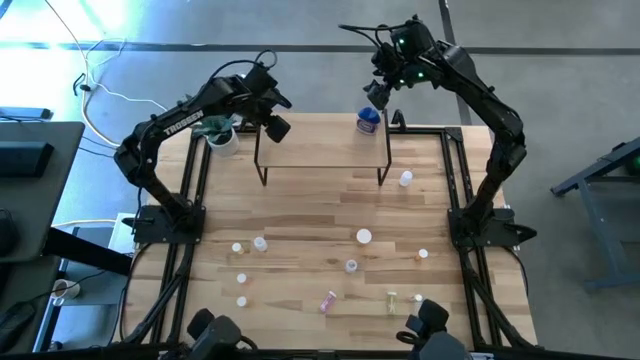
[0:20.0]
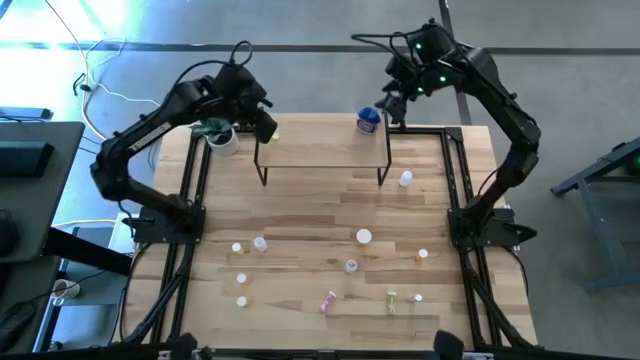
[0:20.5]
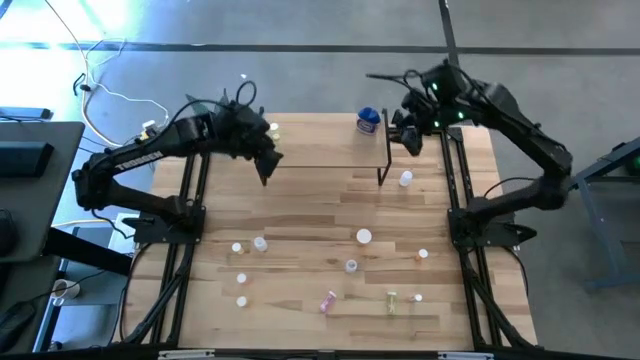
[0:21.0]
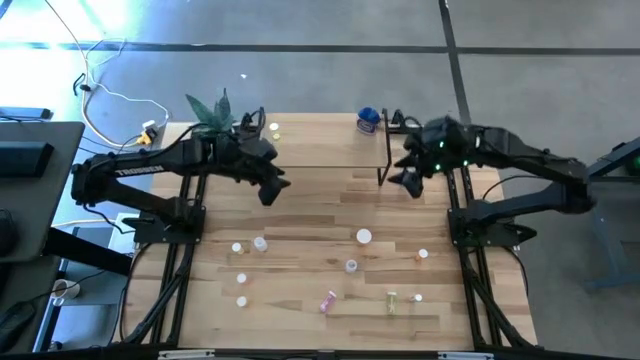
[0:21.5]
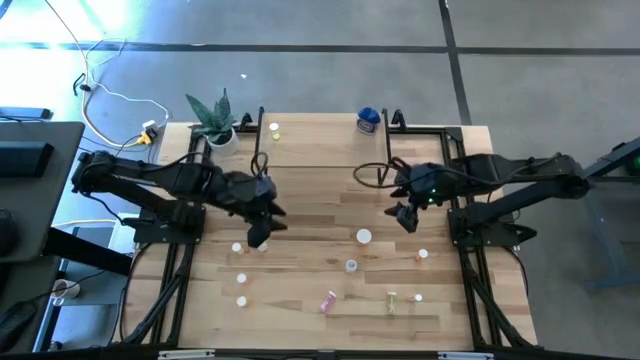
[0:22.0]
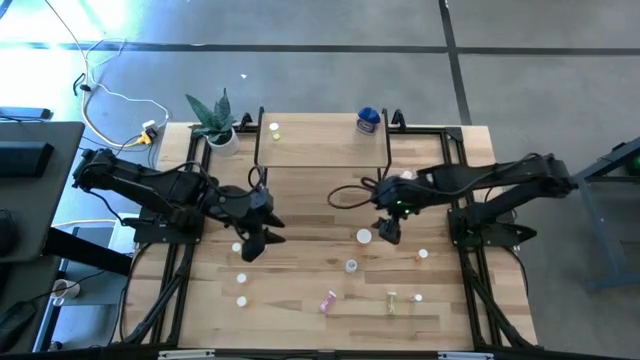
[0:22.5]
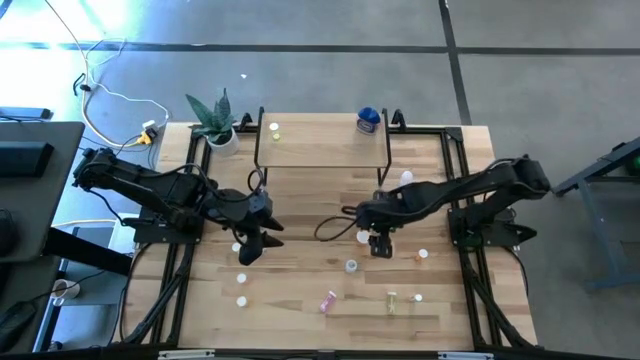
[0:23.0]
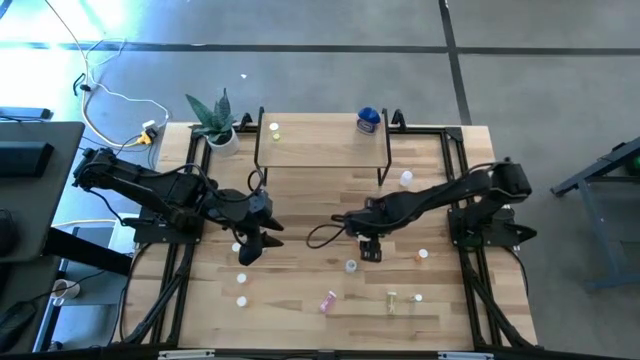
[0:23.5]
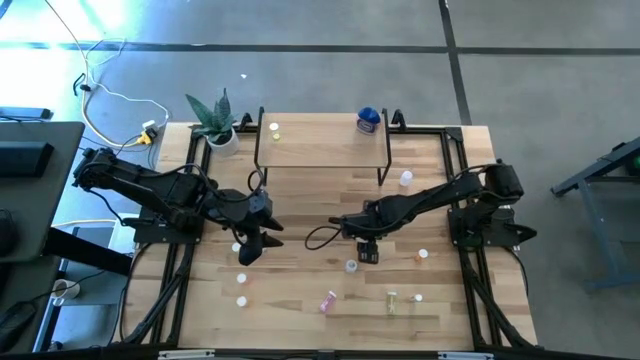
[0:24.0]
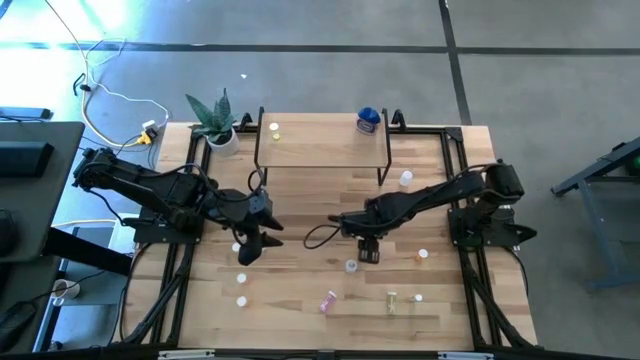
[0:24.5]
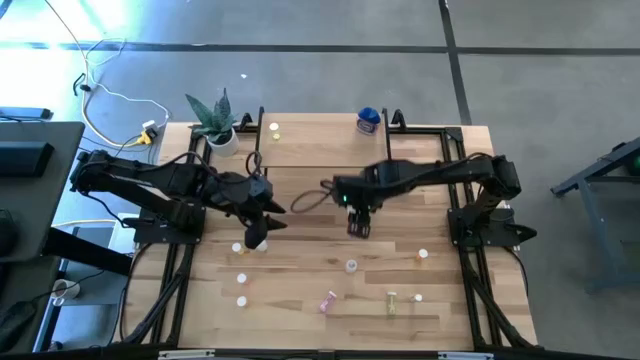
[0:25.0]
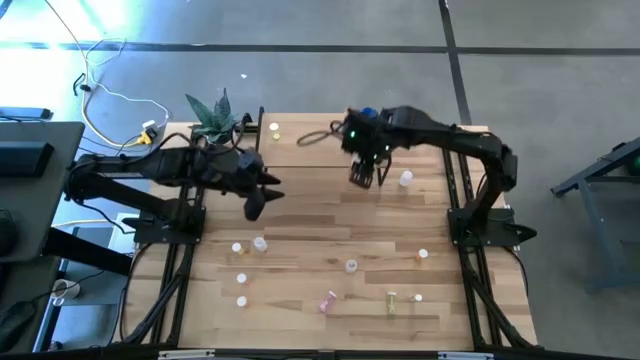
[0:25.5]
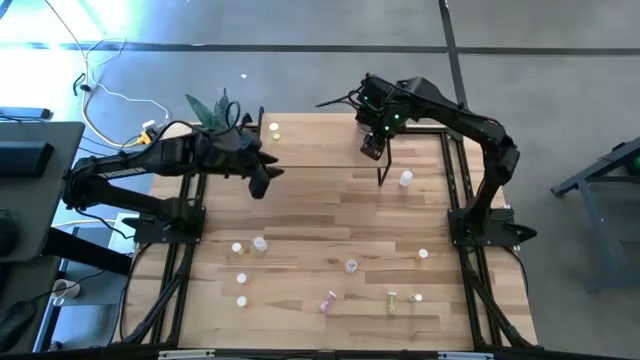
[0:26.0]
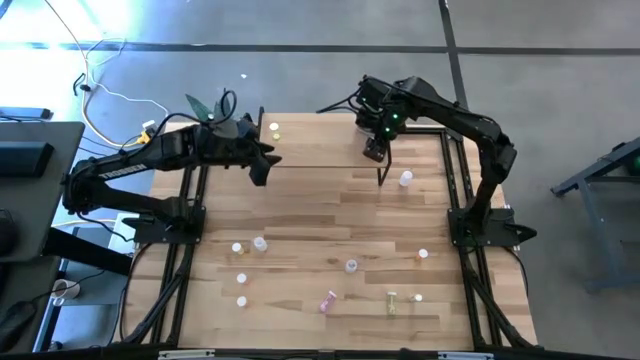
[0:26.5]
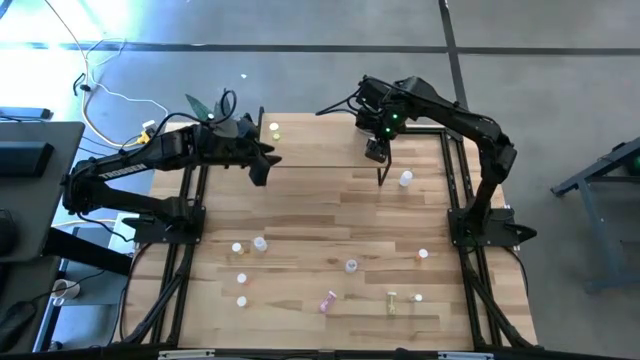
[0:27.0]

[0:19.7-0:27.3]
Task: Pick and place medicine bottles onto shelf by color
Put the large orange pill bottle on the shelf

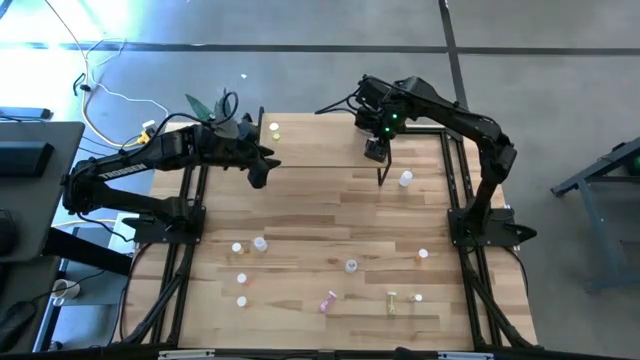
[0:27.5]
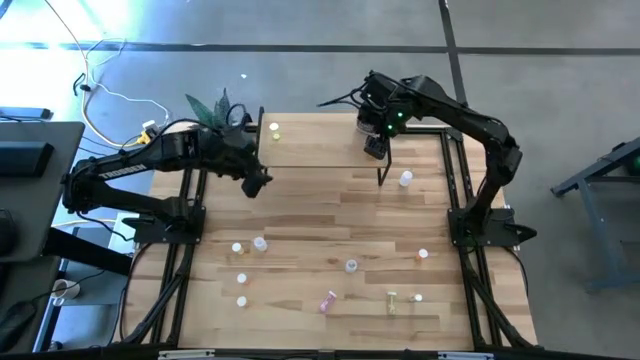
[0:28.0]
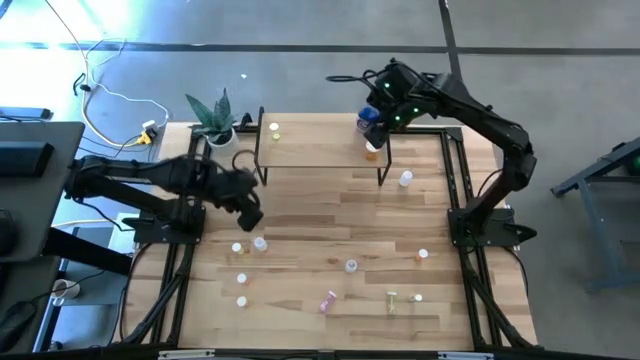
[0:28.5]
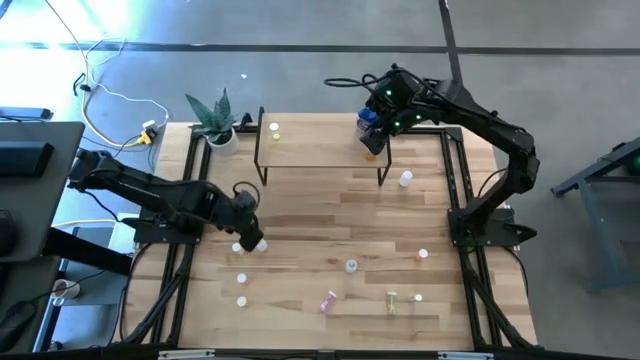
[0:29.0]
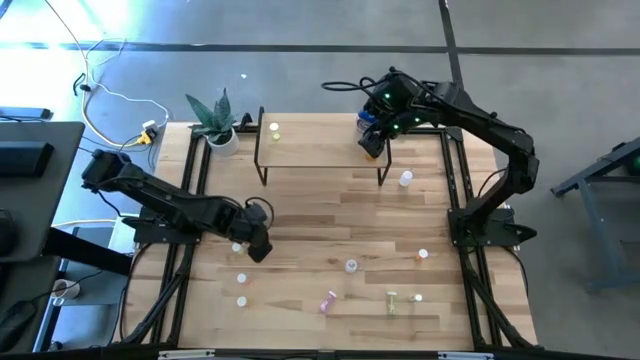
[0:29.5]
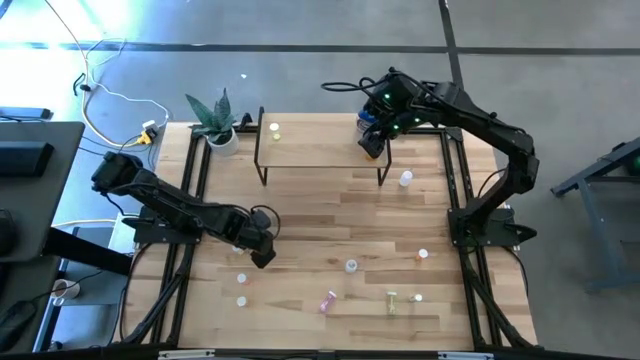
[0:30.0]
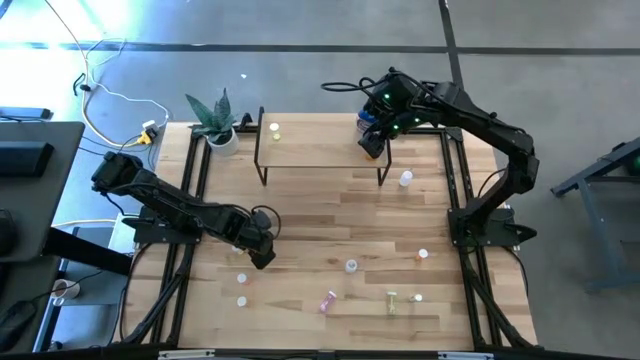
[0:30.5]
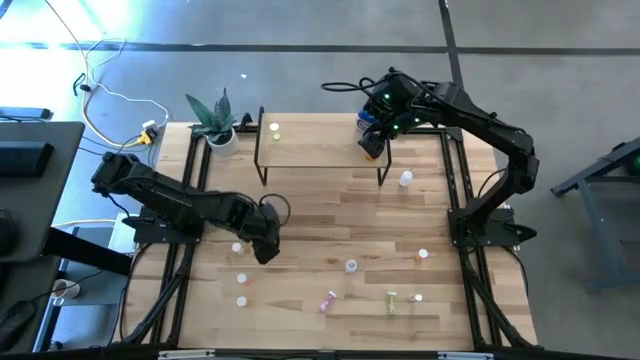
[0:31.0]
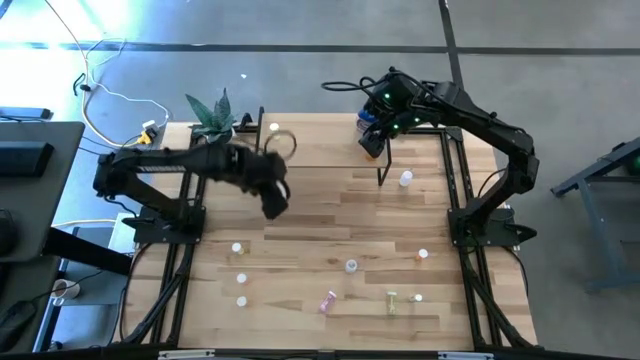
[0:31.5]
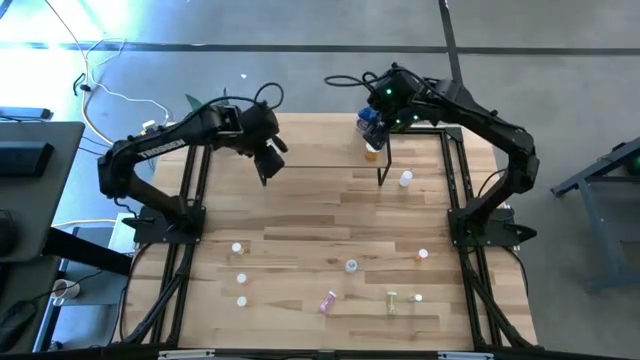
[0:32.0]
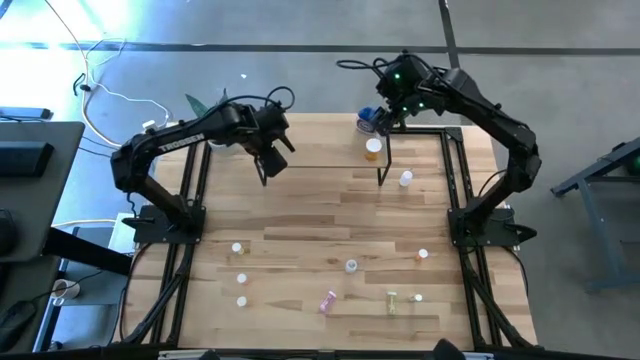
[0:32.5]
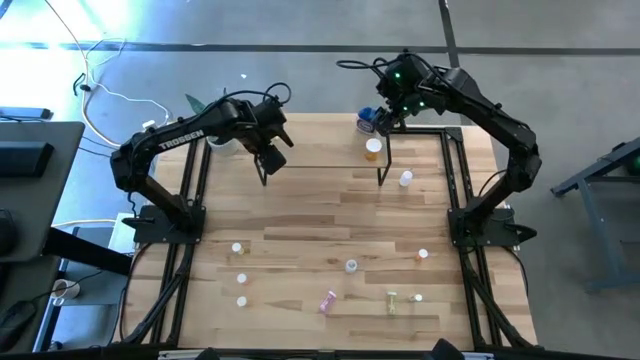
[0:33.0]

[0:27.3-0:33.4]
Put the small transparent pill bottle on the shelf

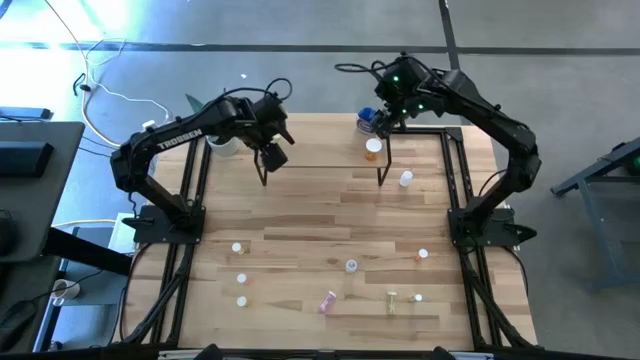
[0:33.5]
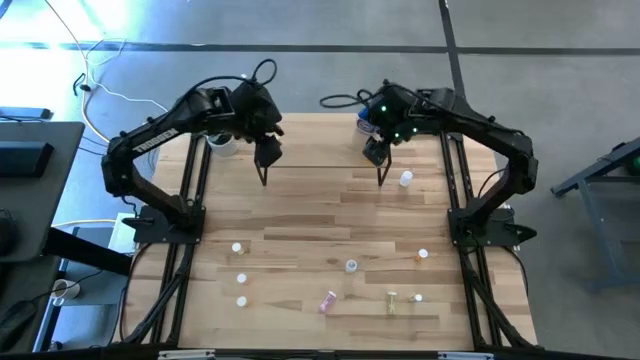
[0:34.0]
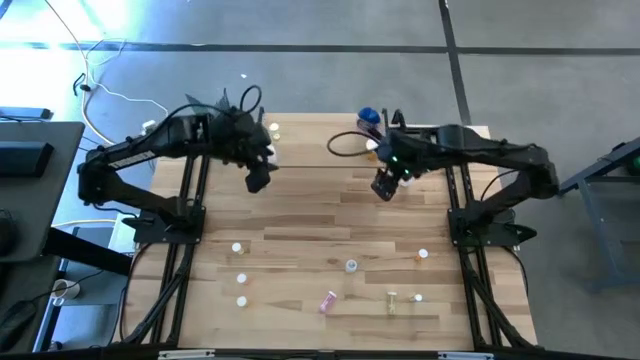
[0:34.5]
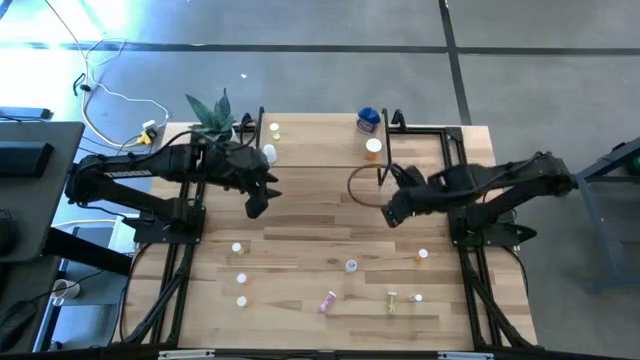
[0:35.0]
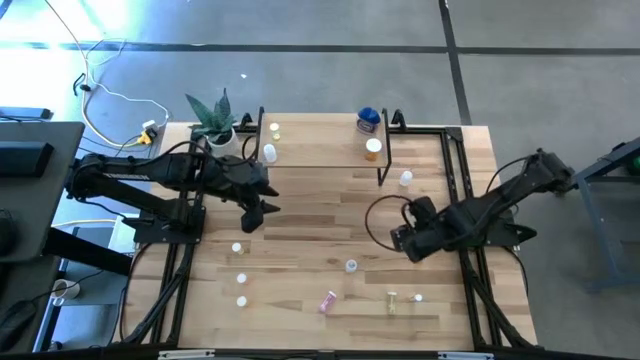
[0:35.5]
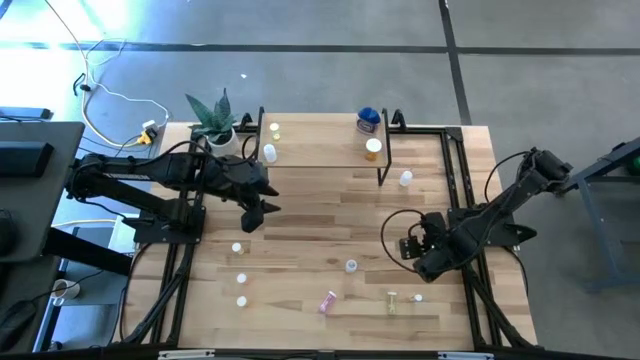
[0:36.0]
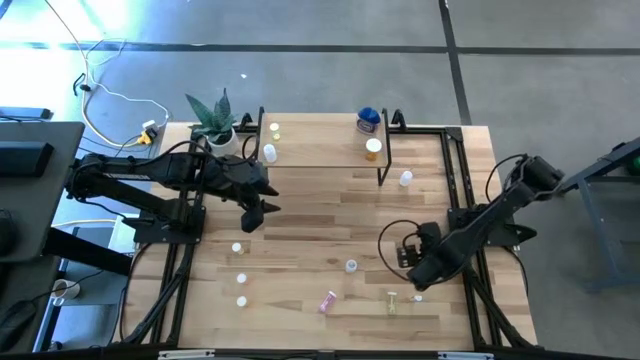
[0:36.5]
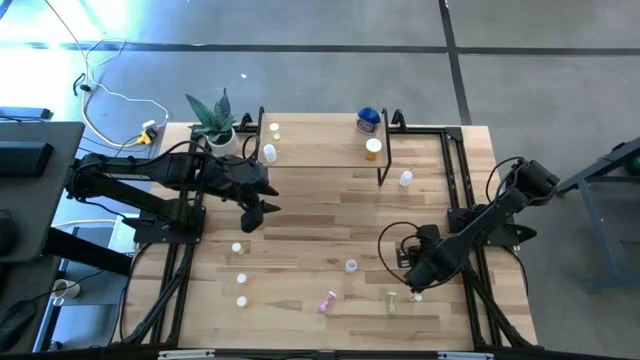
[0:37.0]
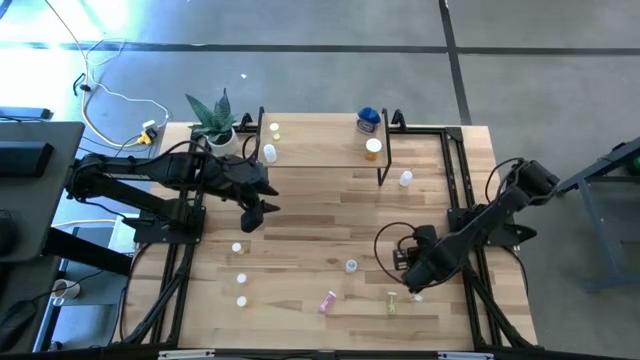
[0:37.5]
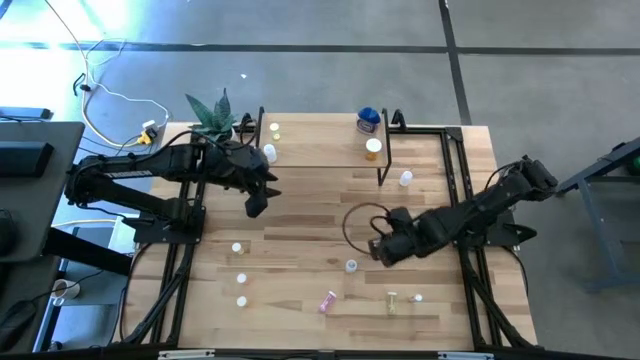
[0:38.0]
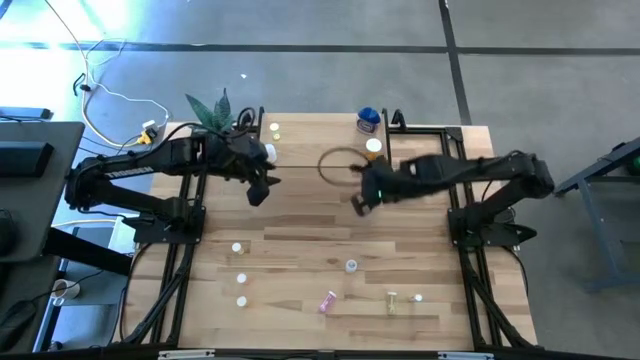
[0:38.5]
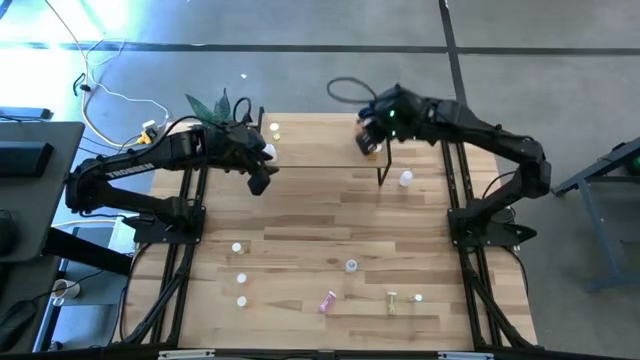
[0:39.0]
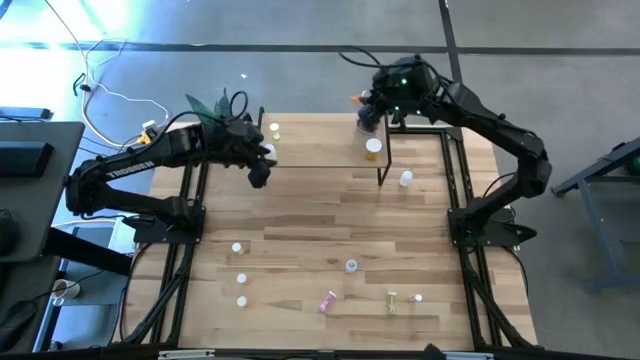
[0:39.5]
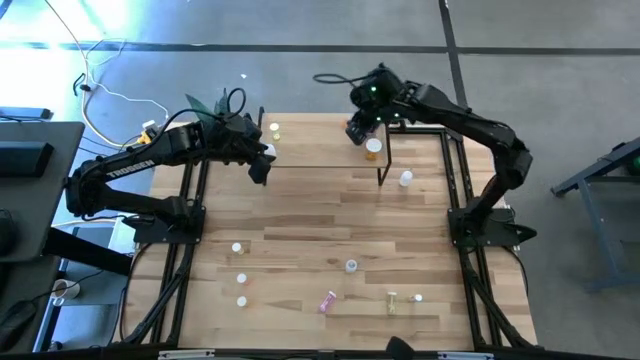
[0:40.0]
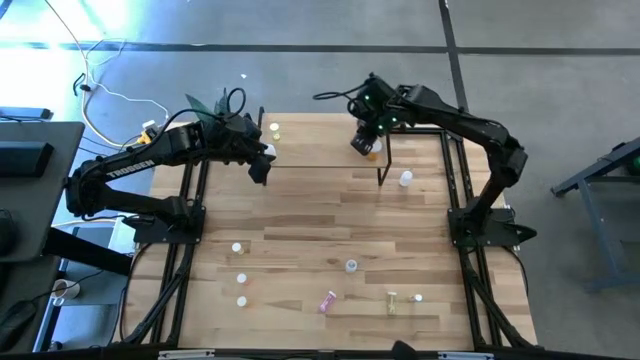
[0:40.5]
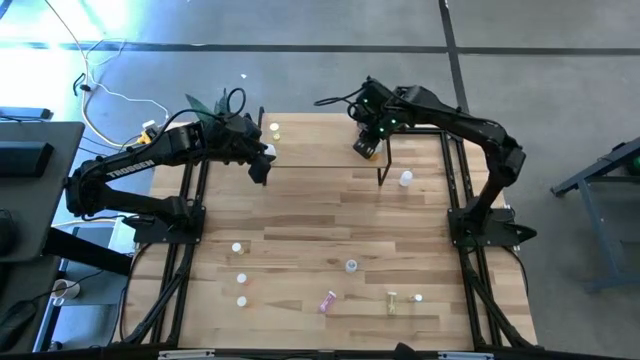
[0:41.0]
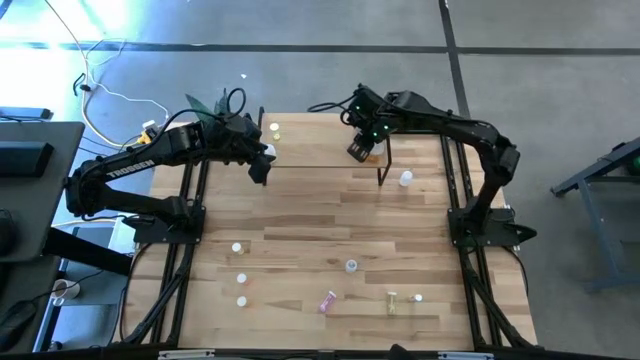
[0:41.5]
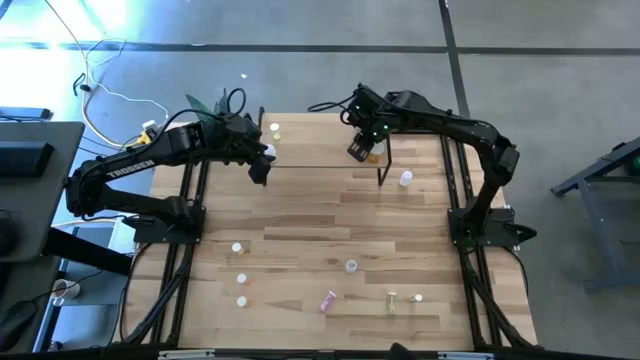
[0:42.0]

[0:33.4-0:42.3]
Put the small orange pill bottle on the shelf
